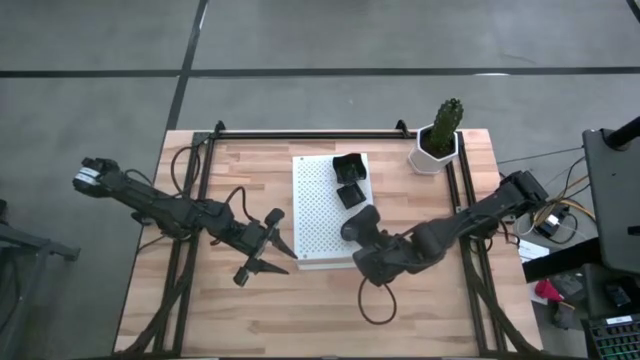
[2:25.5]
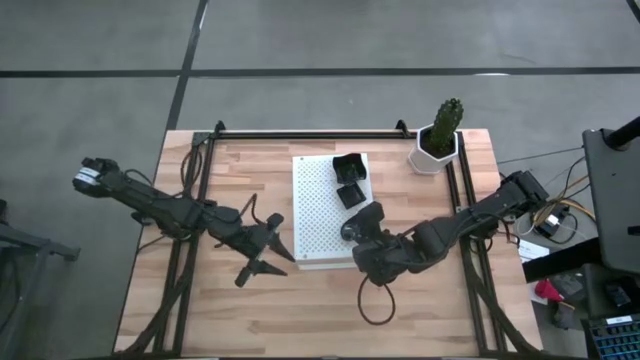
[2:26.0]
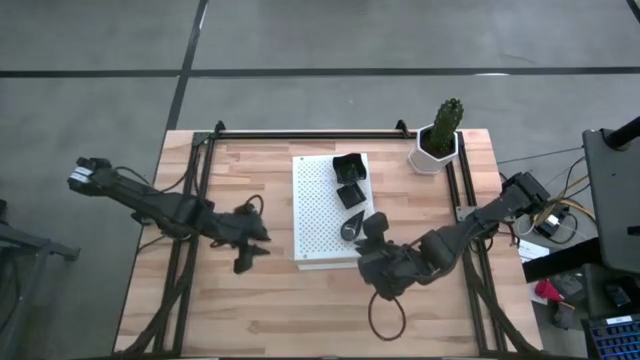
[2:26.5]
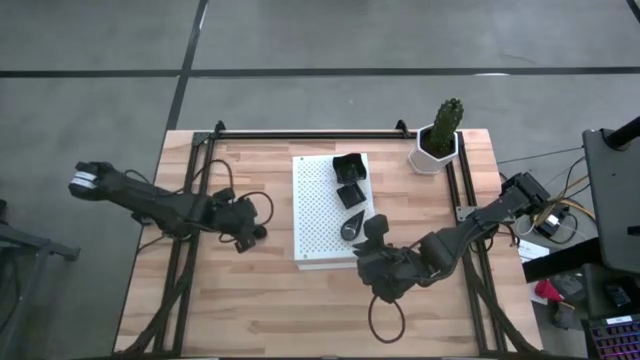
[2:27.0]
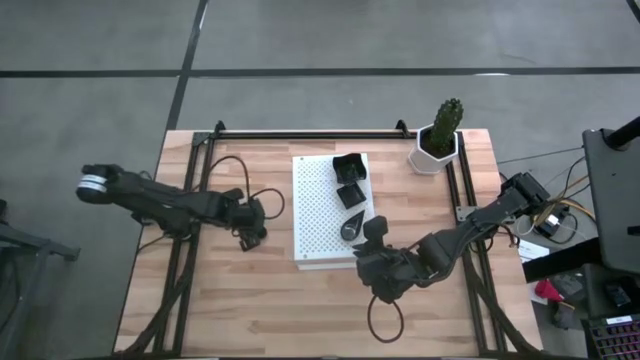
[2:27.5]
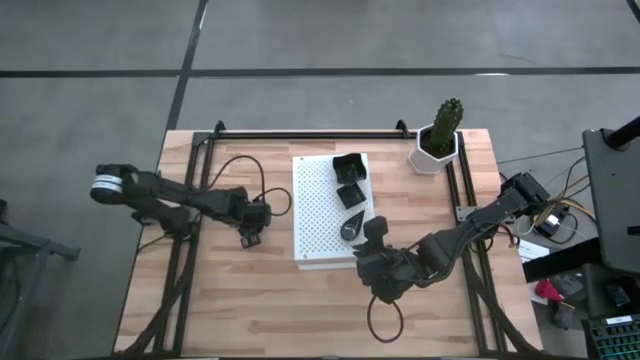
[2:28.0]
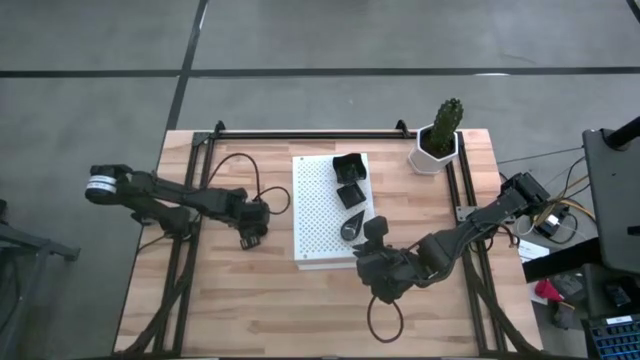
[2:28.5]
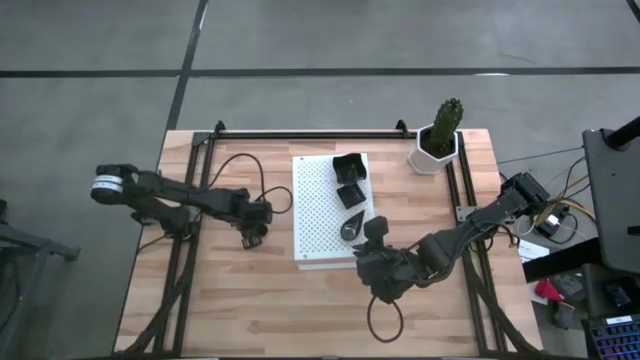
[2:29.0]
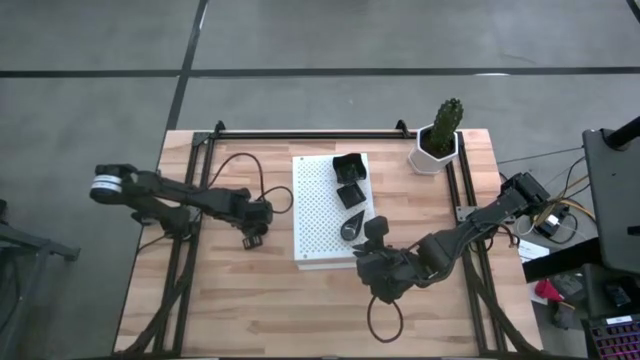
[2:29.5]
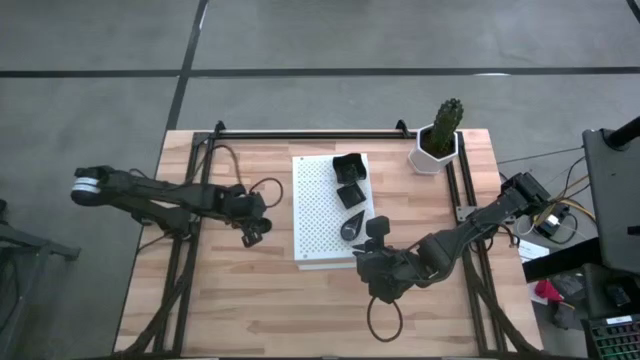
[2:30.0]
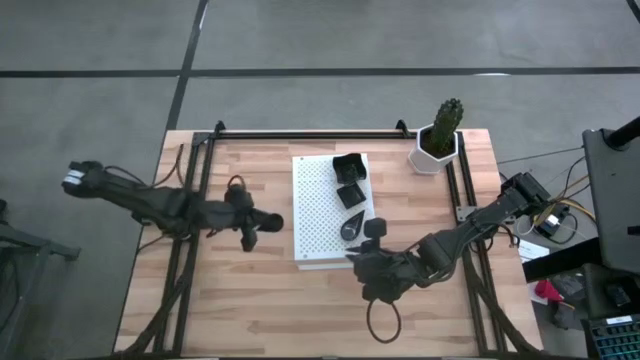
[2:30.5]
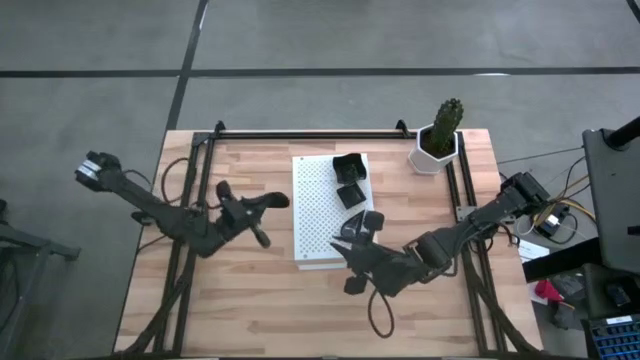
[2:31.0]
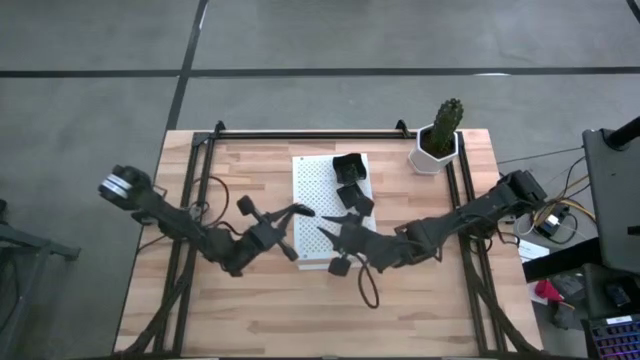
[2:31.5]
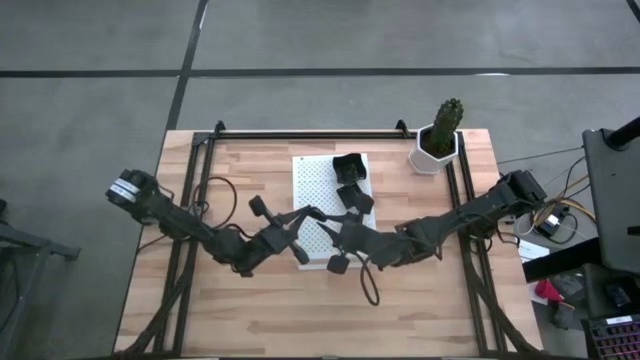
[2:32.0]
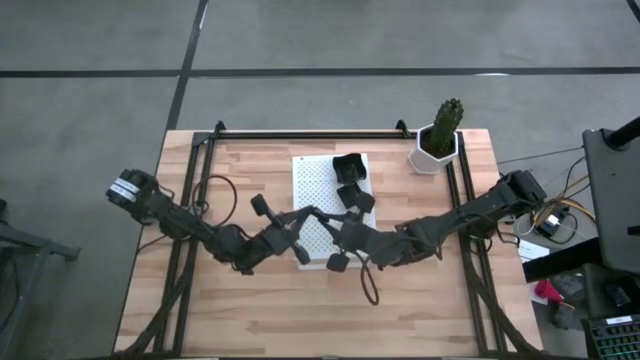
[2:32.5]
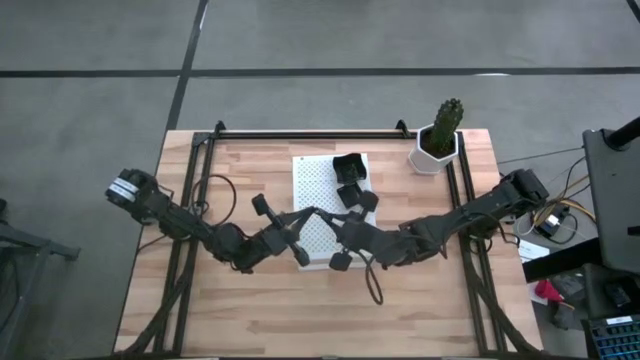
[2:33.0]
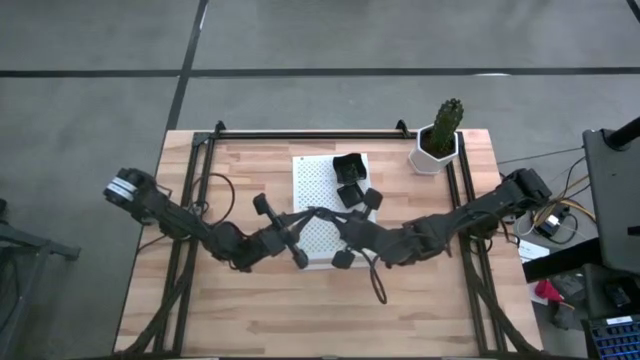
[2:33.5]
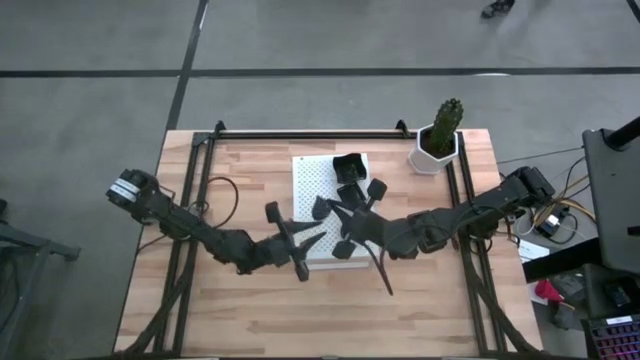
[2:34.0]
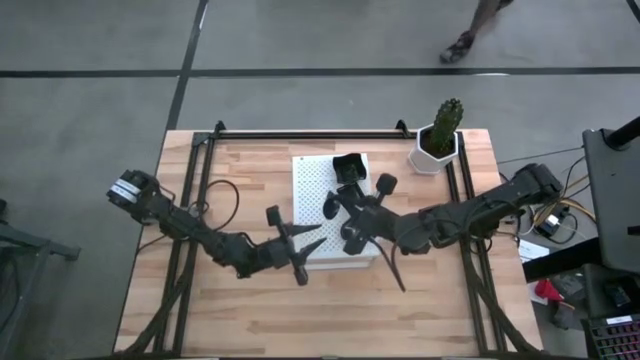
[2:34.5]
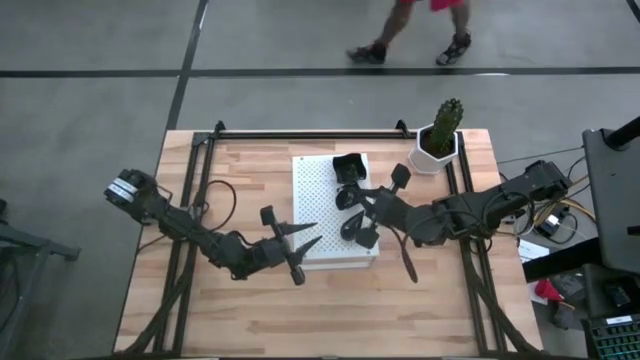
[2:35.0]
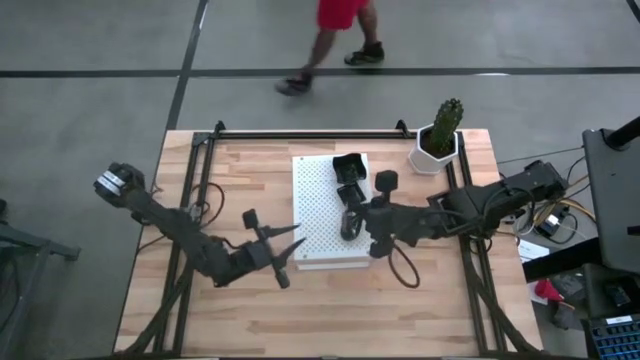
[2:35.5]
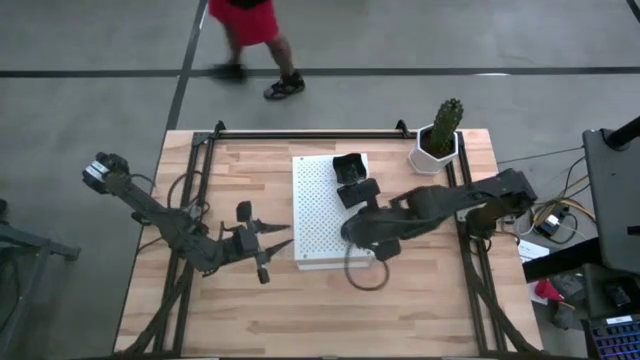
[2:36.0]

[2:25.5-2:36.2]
Task: Pick & Place Mini shaped plates
Stack the black drop-shaped plate on top of the black drop-shaped plate on the shelf

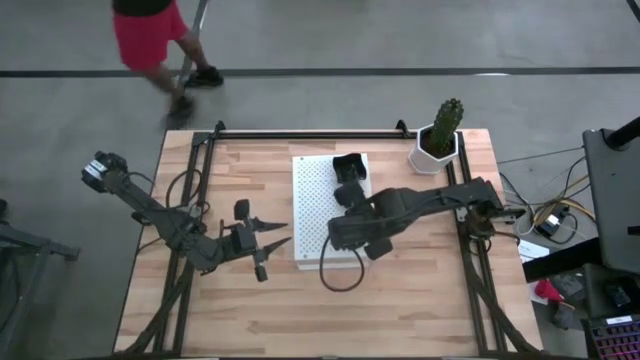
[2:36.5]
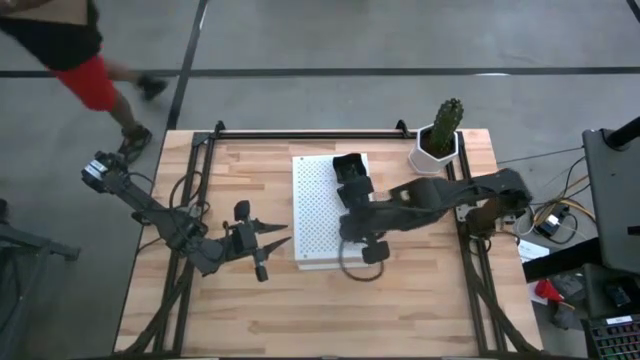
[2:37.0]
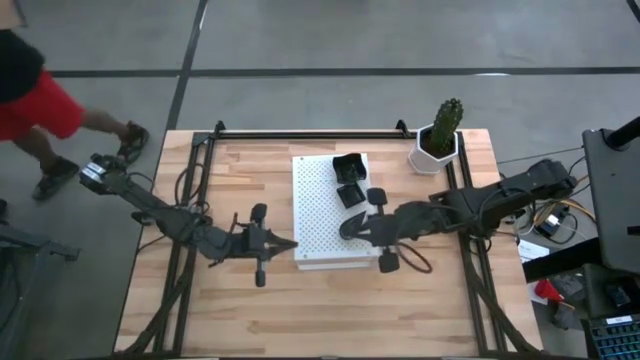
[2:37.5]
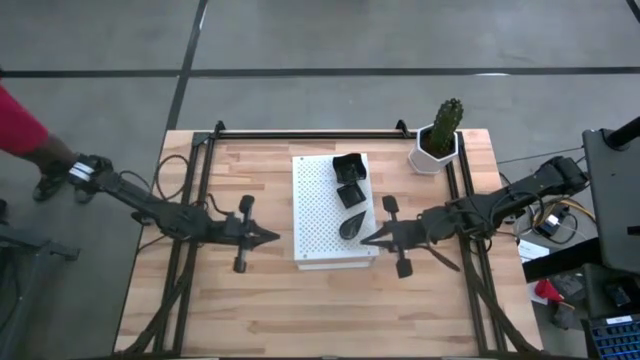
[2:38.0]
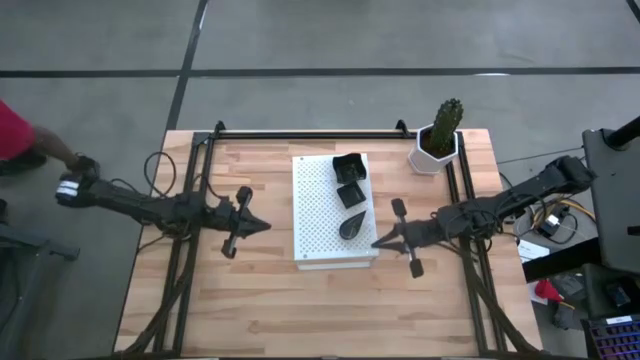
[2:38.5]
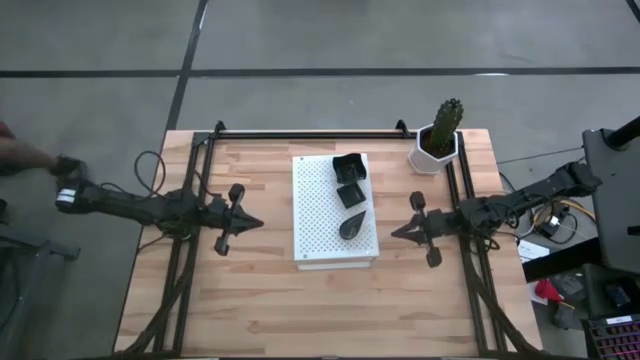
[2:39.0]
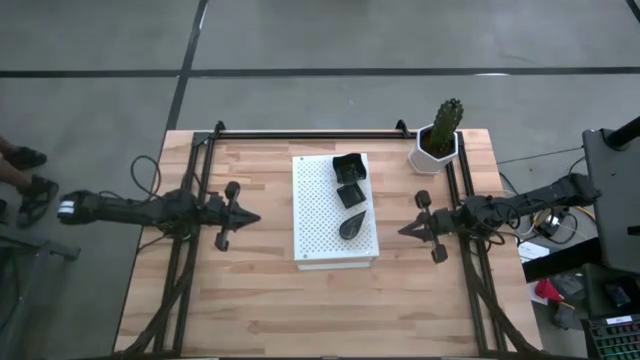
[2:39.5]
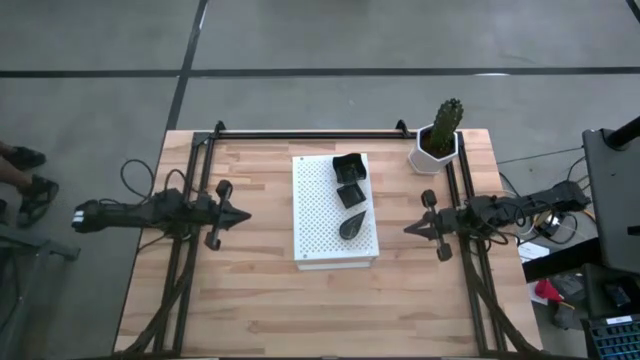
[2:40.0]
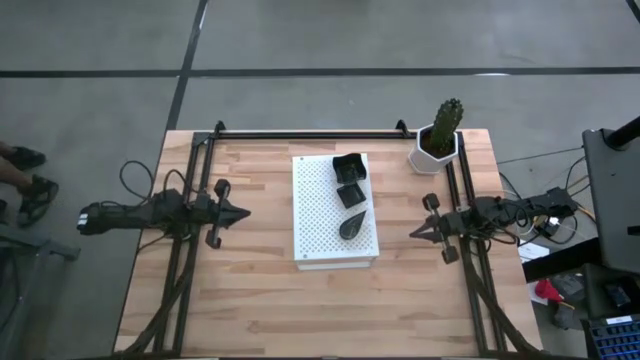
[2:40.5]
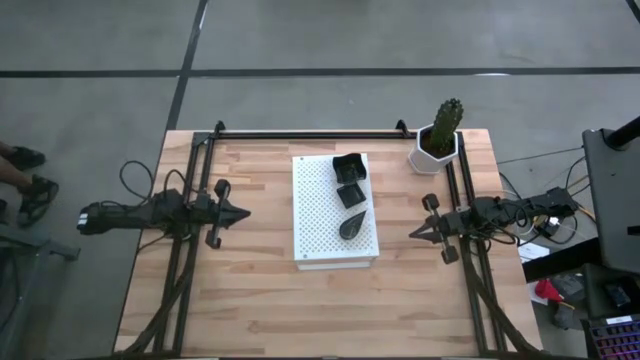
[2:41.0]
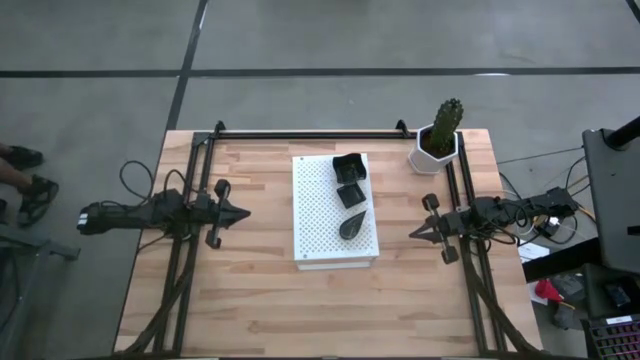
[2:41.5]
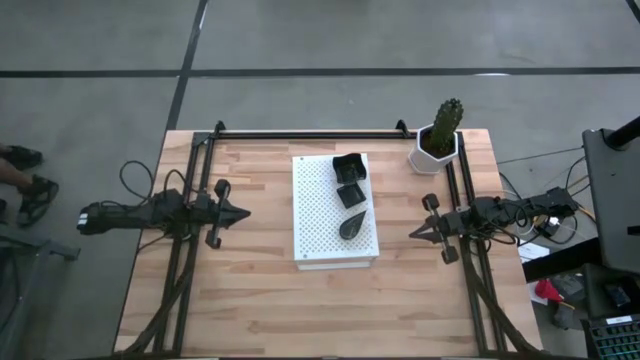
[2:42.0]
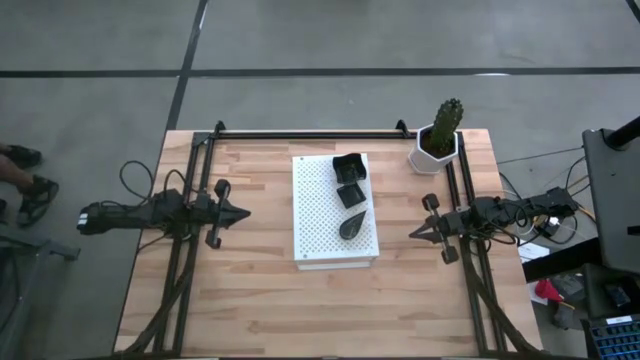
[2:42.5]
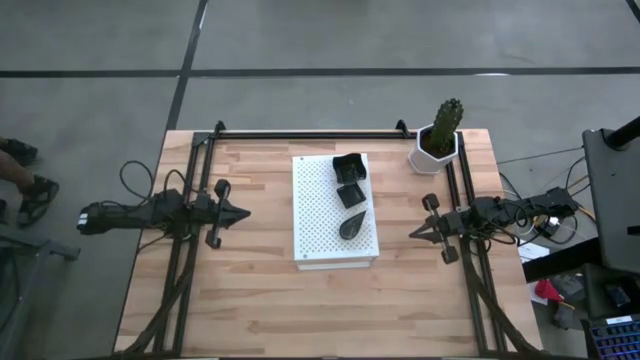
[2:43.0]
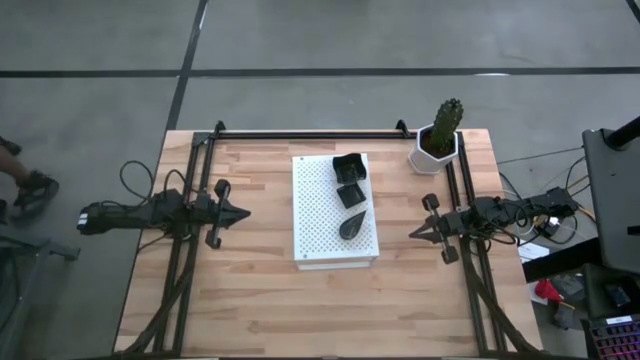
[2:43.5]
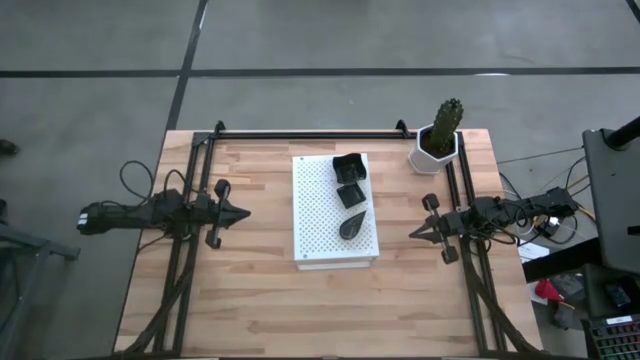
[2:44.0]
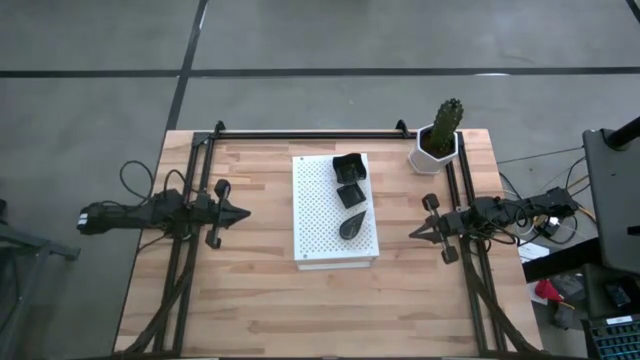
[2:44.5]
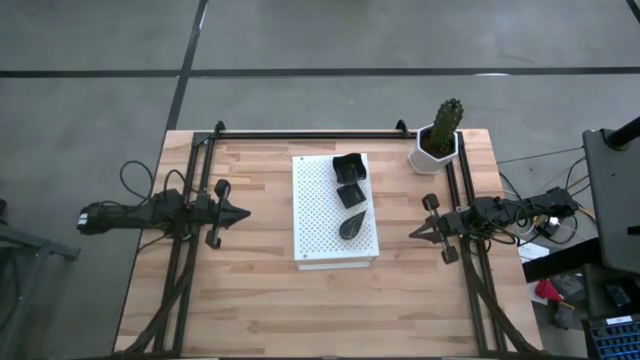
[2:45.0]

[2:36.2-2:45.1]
Return to Home Position

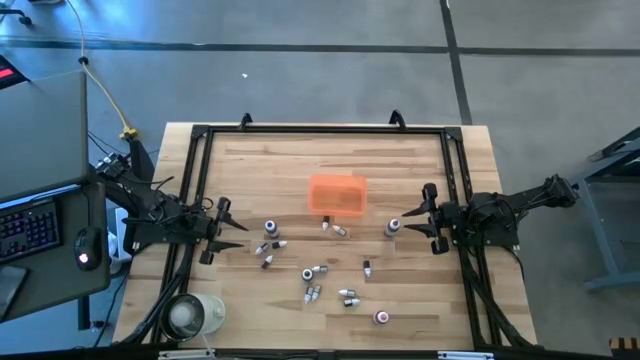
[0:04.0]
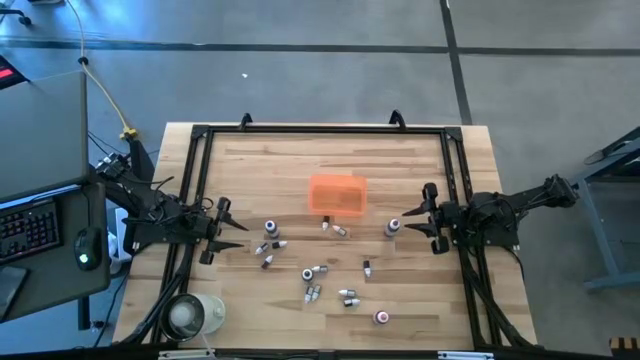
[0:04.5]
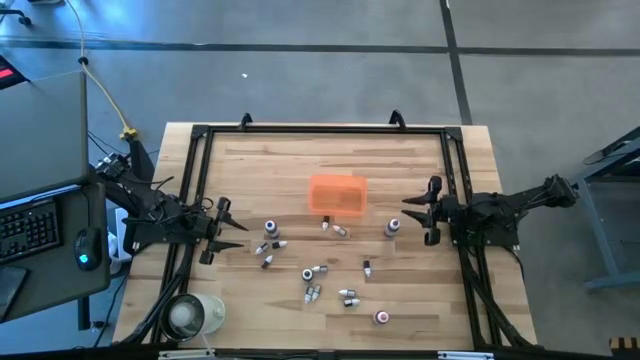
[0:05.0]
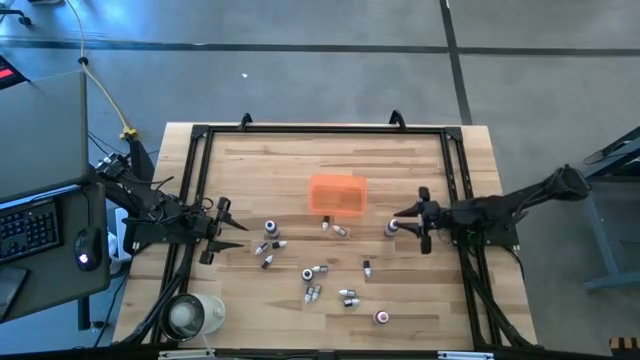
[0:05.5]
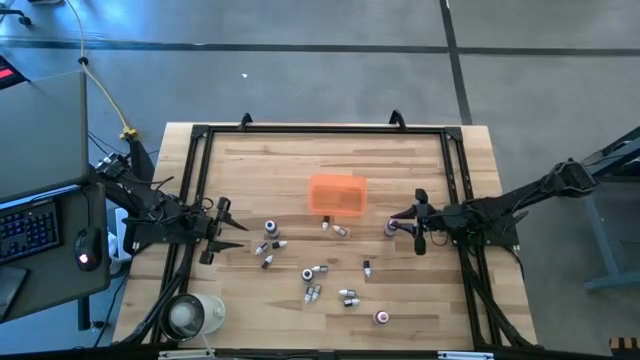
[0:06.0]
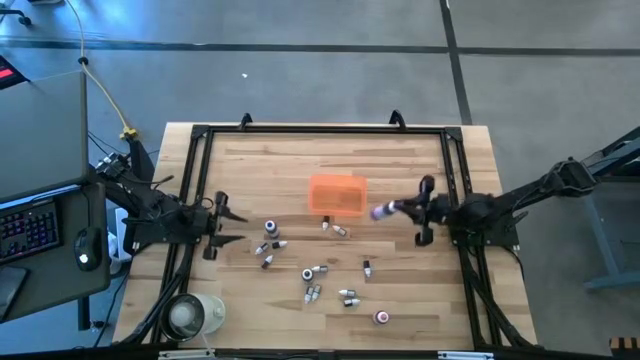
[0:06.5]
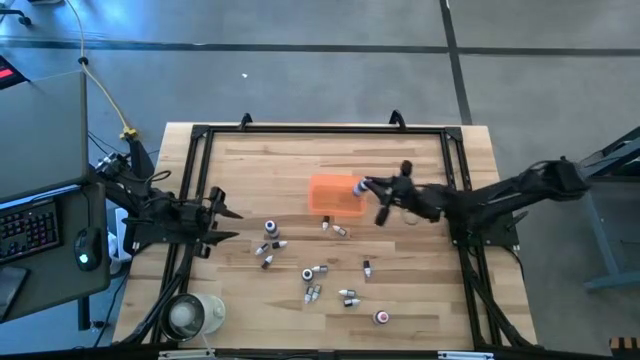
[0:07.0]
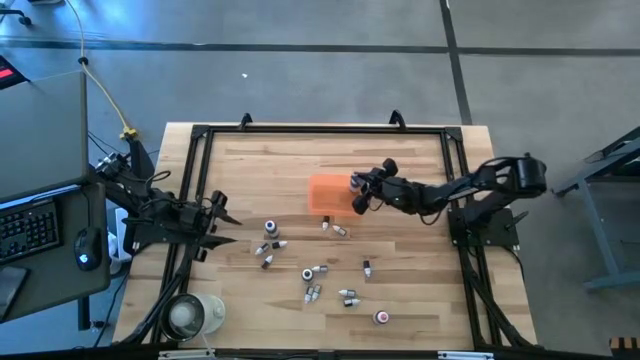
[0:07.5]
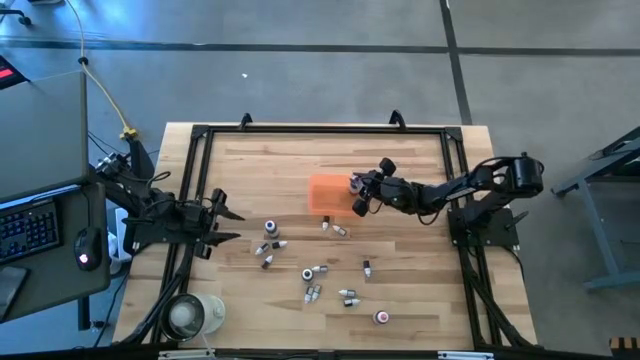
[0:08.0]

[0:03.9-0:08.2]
Task: Pick & Place food coloring
Put the large violet food coloring bottle into the orange bin
